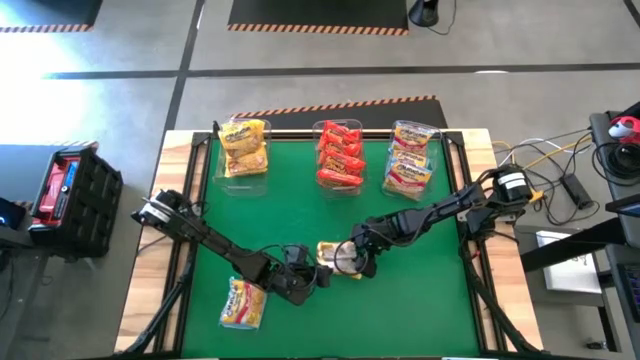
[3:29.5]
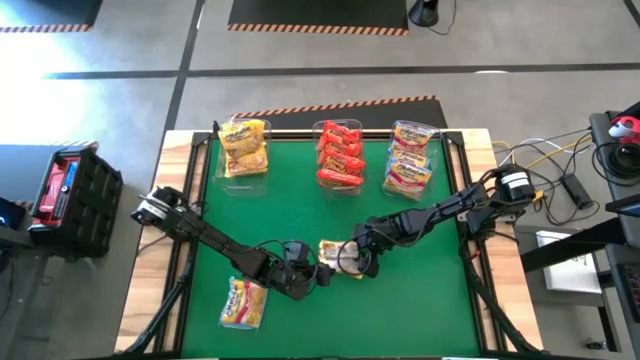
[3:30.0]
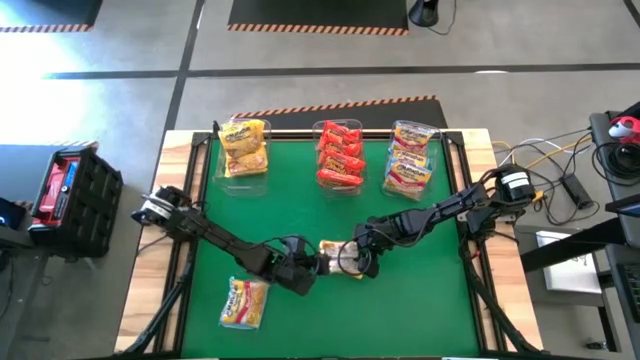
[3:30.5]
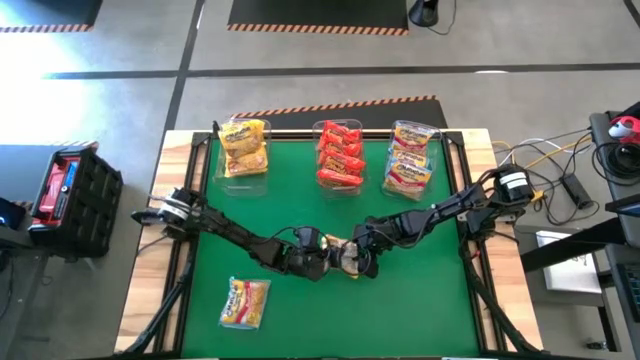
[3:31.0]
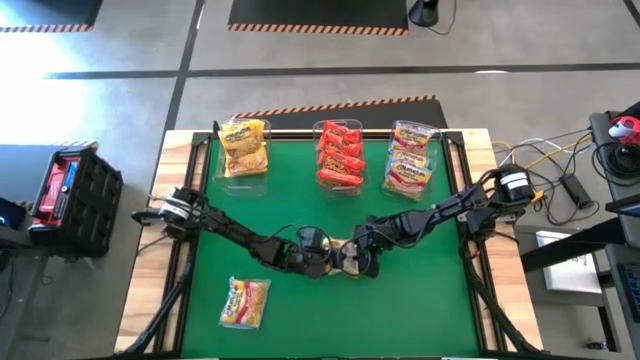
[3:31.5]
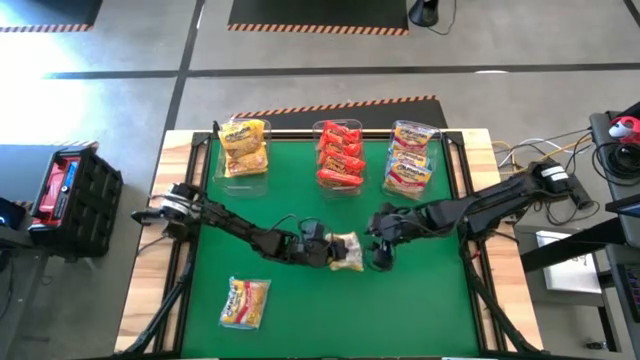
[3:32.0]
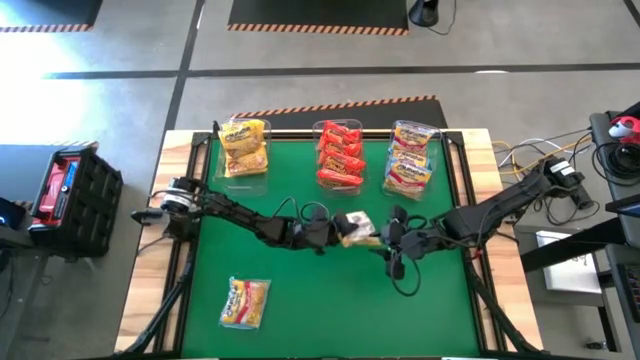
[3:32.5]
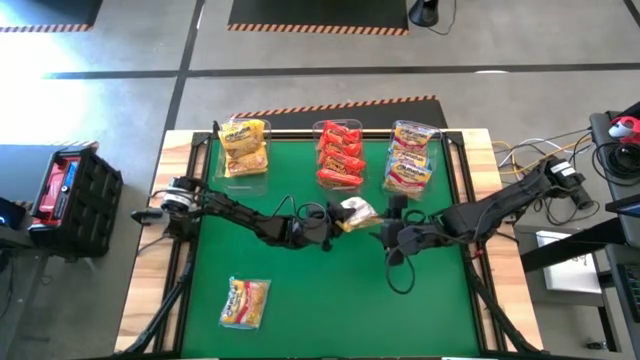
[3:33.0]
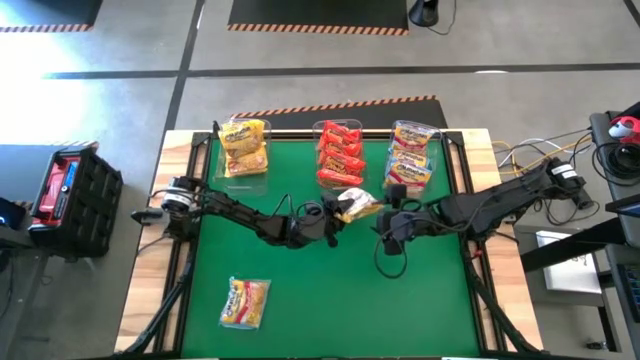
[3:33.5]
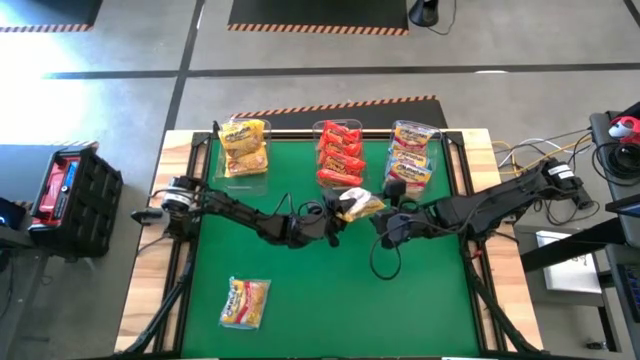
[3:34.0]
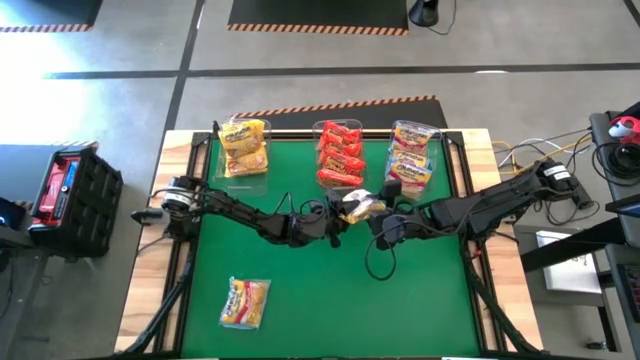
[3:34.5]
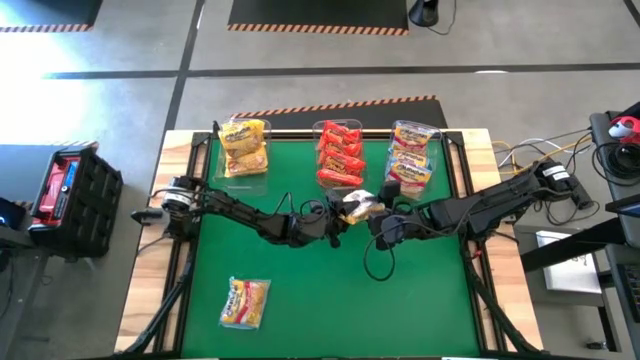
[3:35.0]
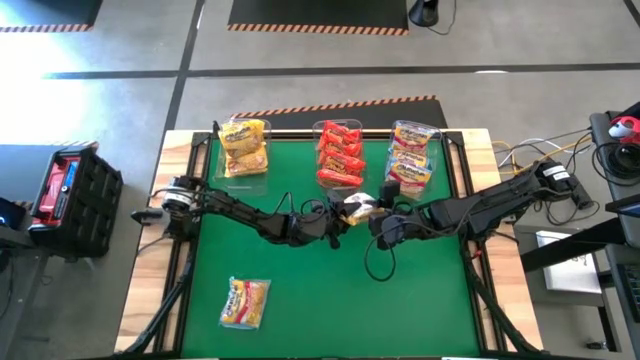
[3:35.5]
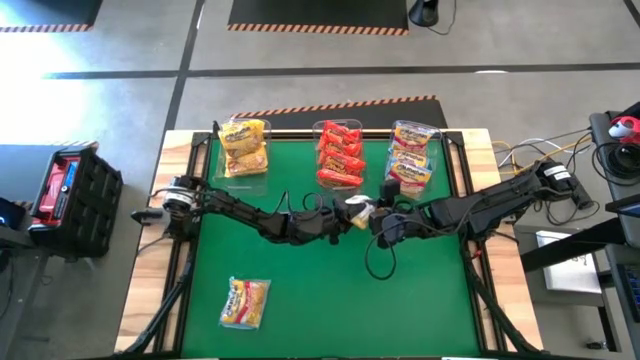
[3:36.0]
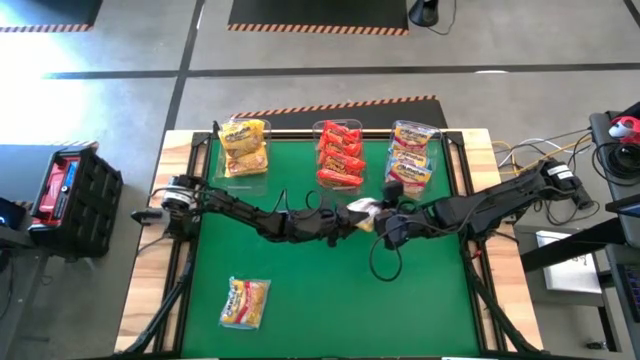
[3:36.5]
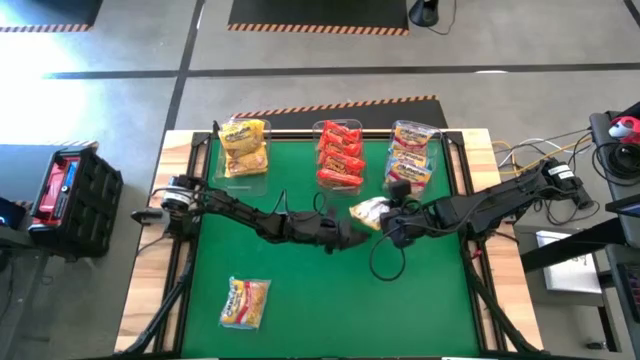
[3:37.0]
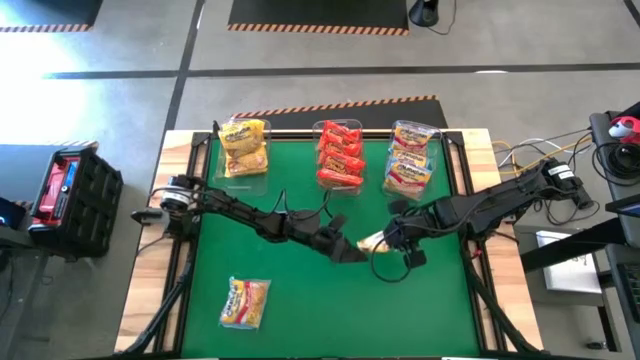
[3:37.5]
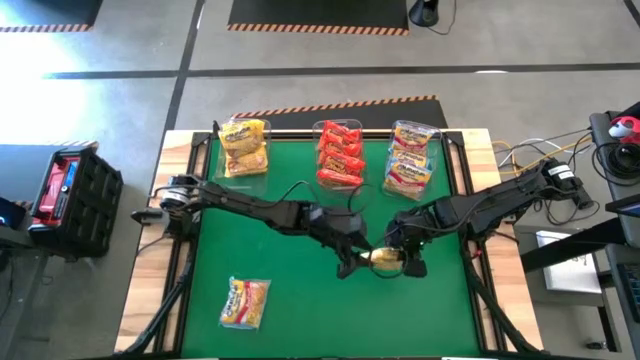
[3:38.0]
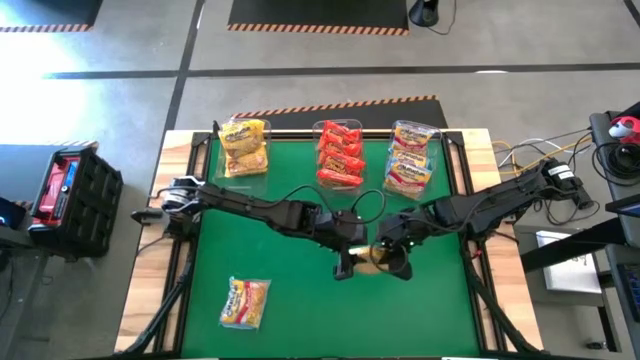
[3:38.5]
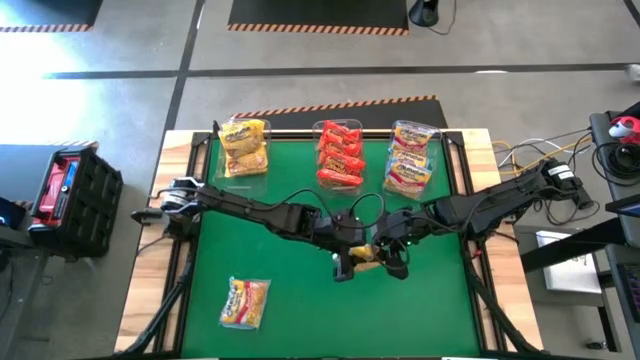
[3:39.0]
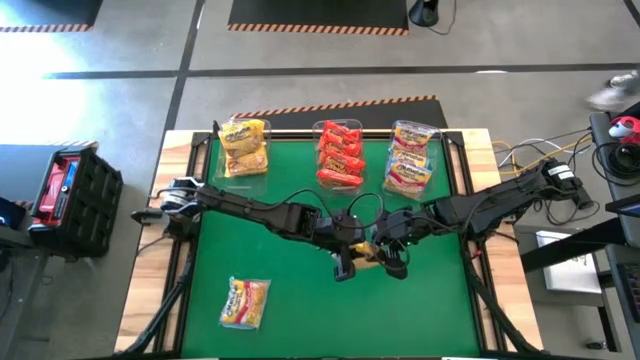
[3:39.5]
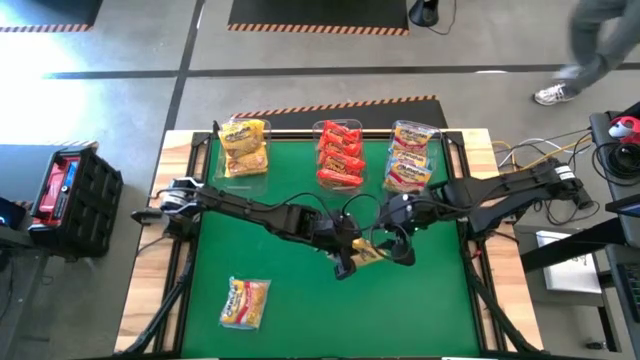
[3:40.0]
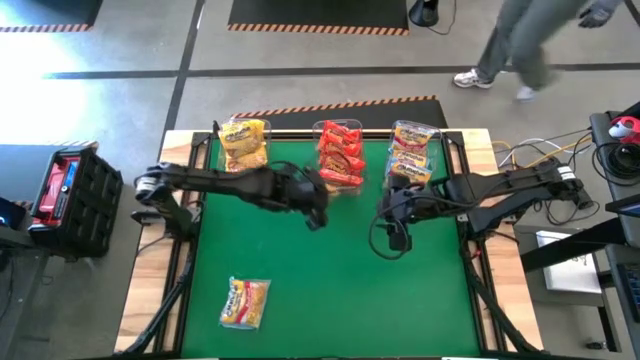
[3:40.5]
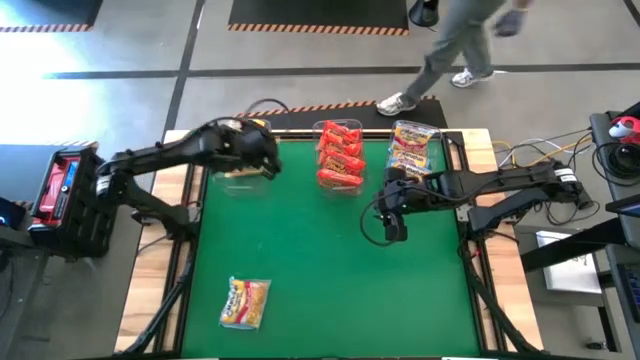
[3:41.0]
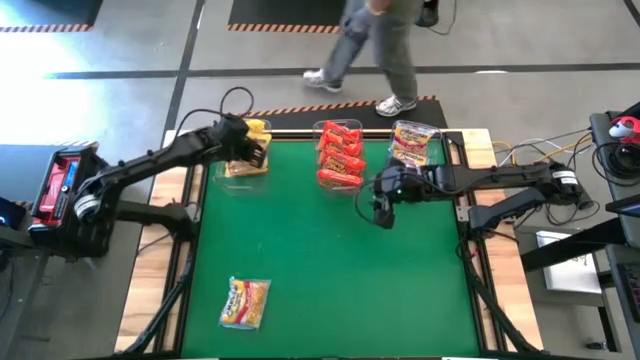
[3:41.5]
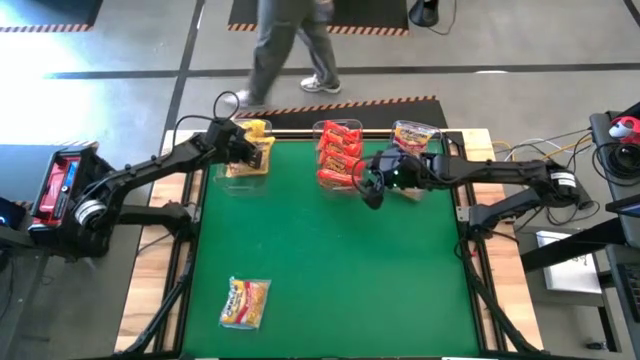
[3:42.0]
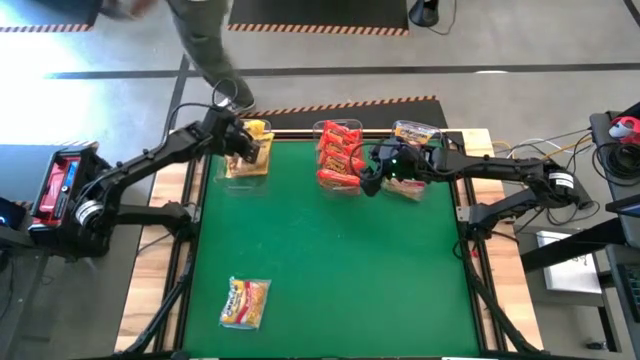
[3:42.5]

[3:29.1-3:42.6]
Task: Sort Maruchan noodles
Put the yellow noodle pack into the left transparent bin

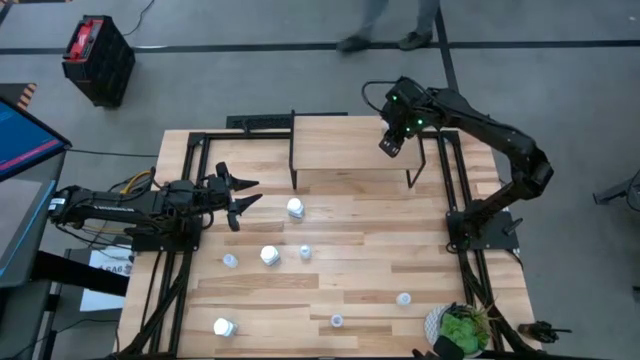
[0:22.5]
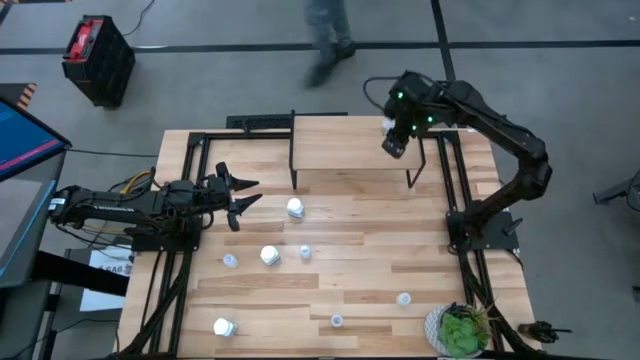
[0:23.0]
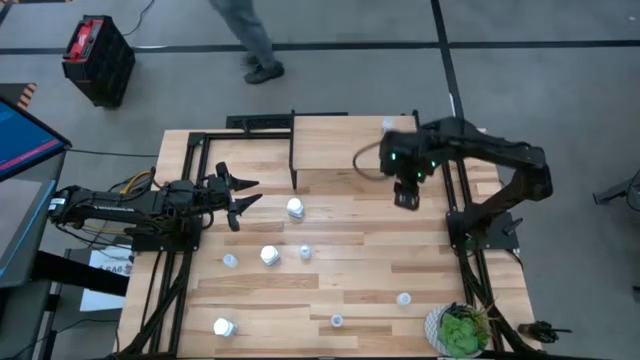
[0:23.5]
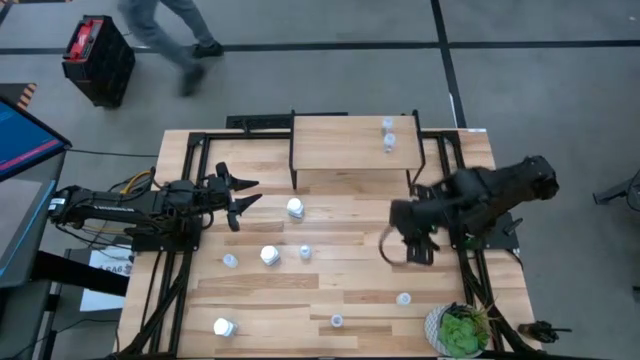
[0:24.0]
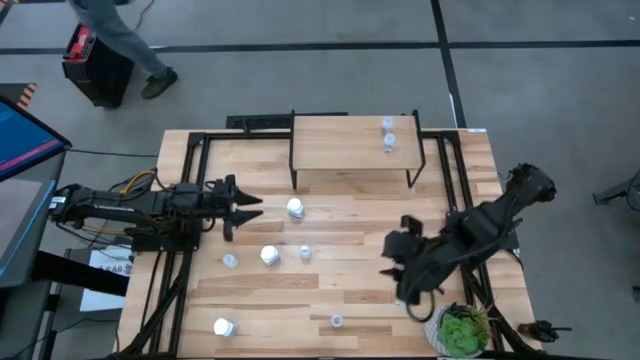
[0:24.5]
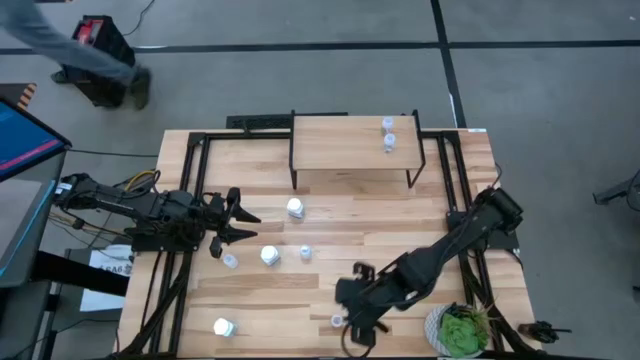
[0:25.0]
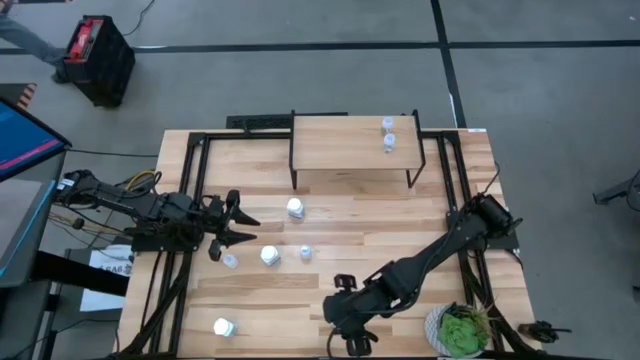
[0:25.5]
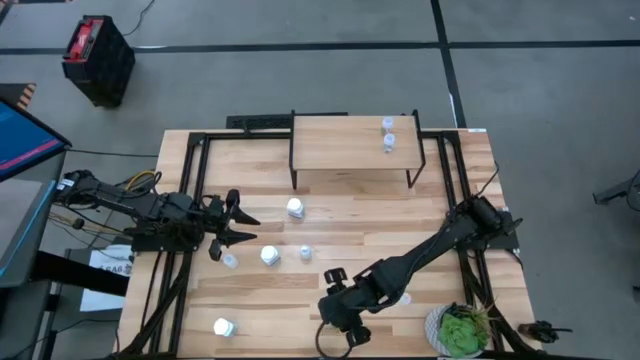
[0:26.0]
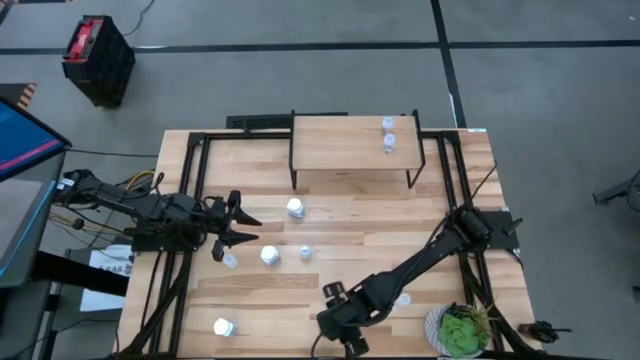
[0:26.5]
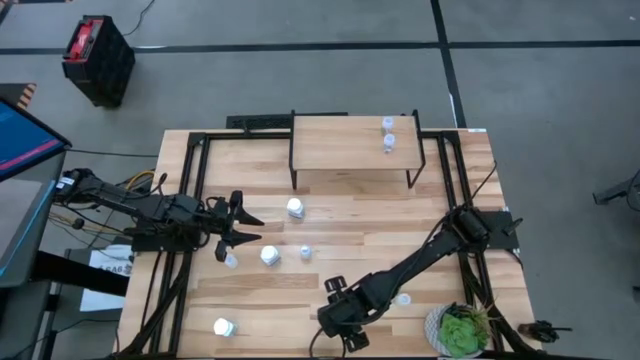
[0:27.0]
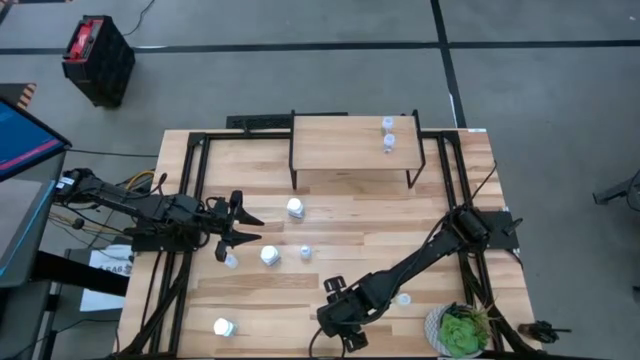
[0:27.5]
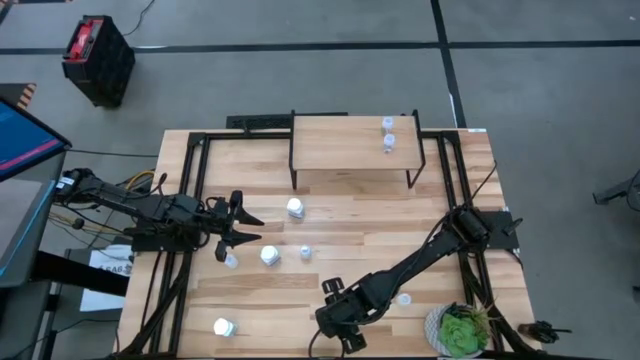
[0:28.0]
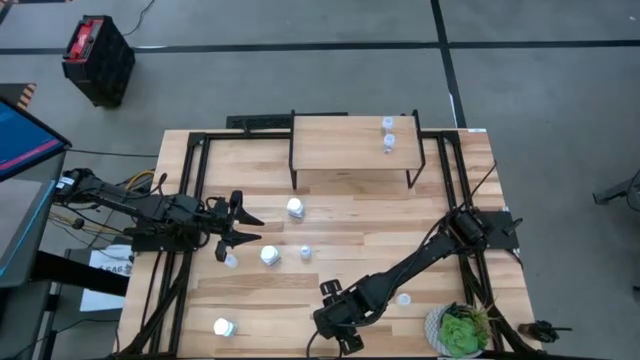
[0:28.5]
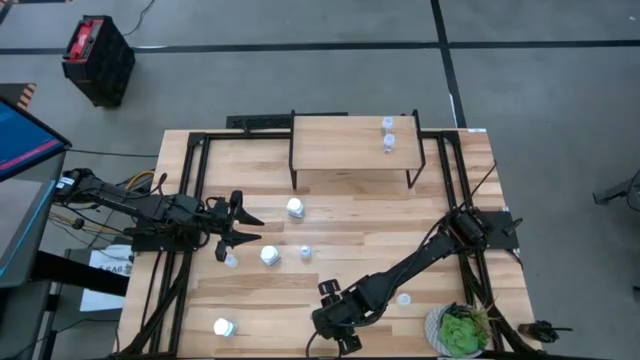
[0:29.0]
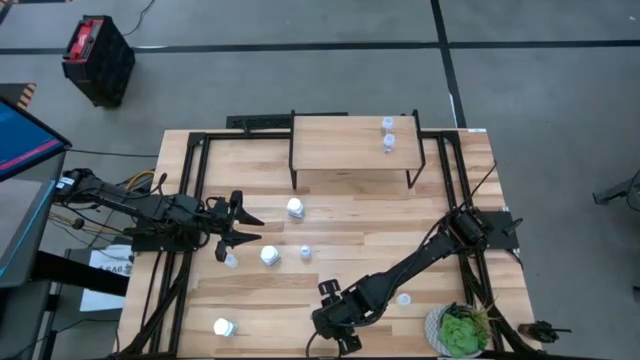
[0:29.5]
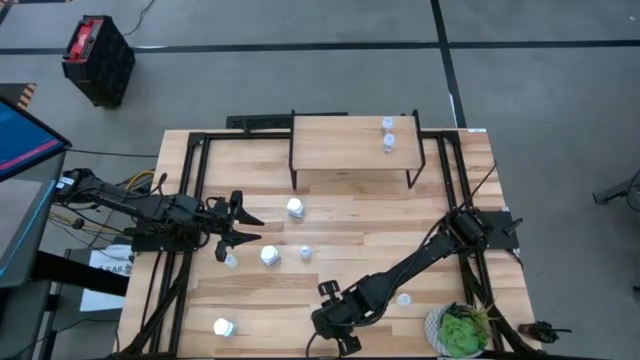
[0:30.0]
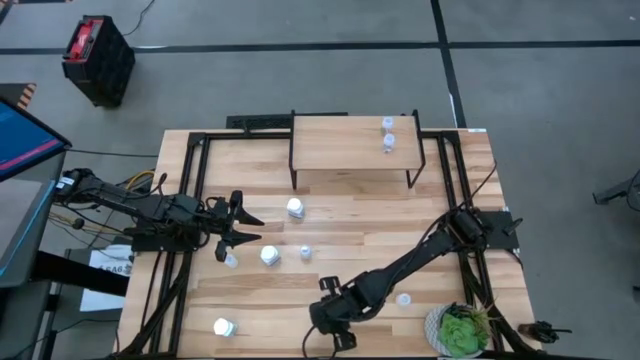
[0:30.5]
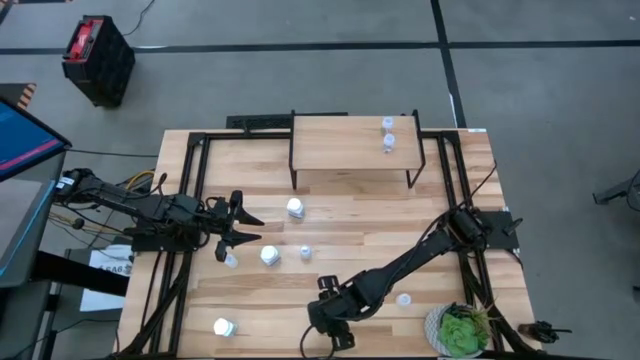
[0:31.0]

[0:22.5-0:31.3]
Task: Pick and place medicine bottles onto shelf by color
Put the transparent medicine bottle onto the right side of the shelf
